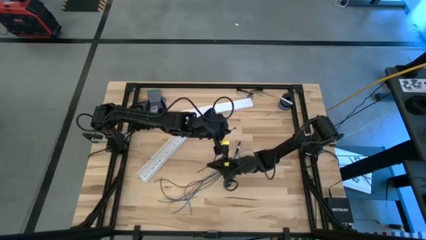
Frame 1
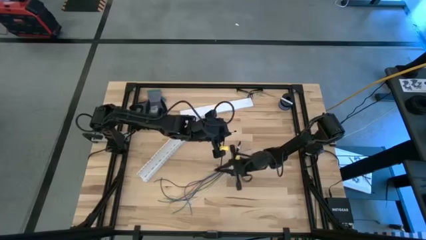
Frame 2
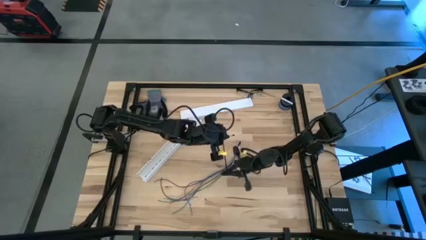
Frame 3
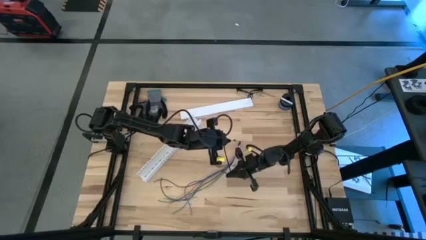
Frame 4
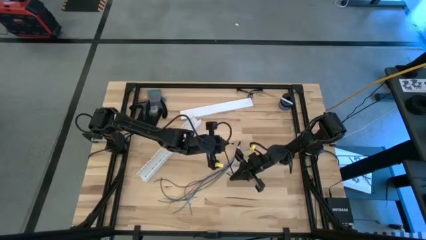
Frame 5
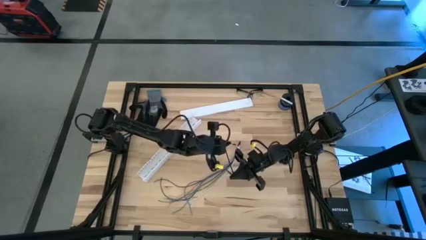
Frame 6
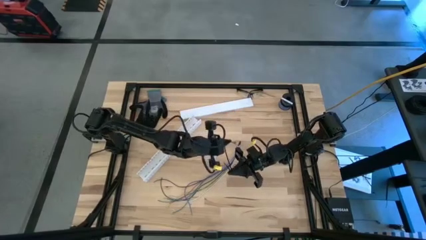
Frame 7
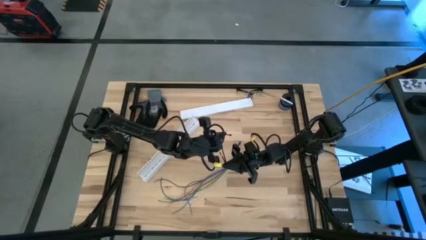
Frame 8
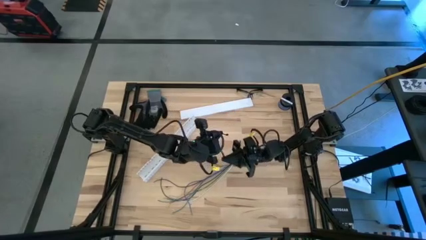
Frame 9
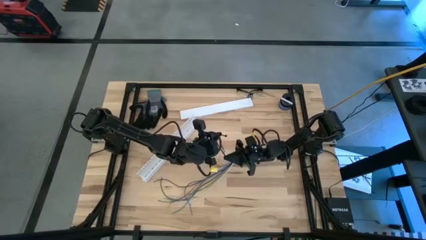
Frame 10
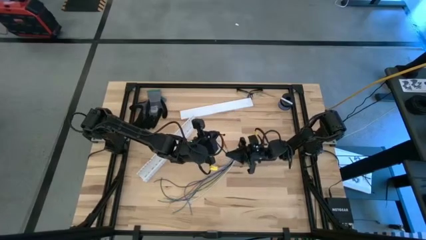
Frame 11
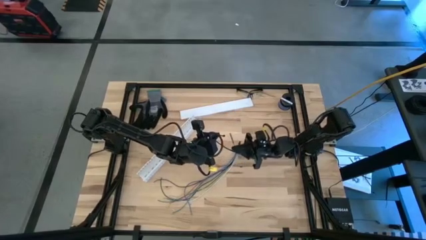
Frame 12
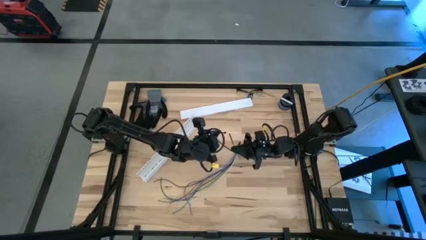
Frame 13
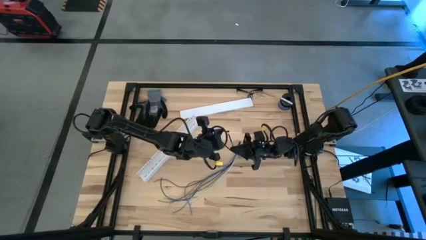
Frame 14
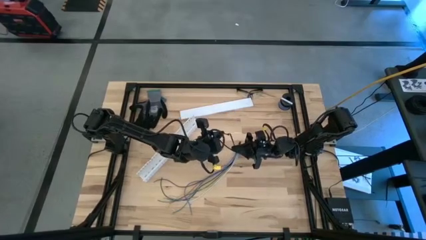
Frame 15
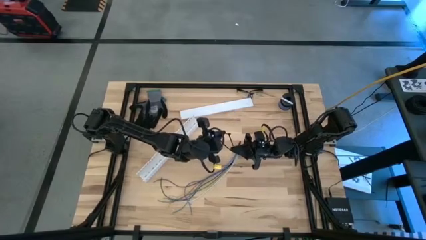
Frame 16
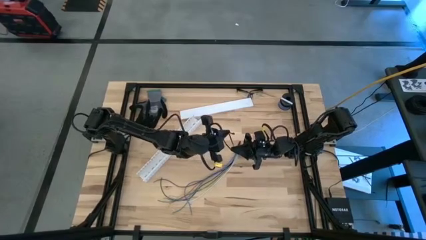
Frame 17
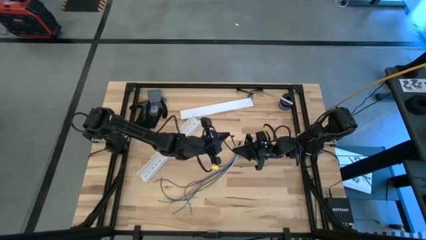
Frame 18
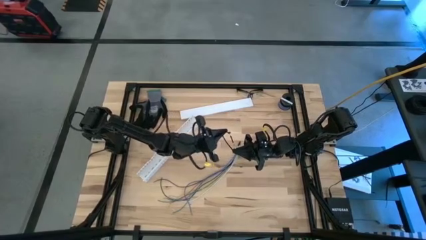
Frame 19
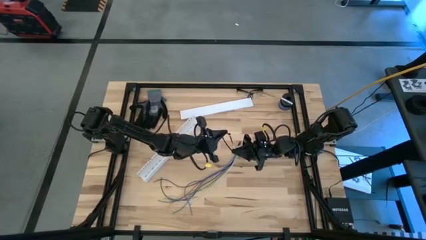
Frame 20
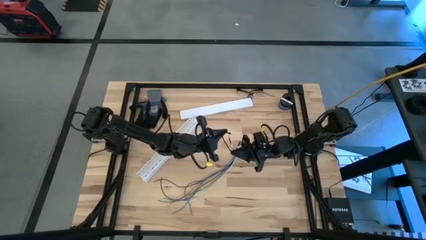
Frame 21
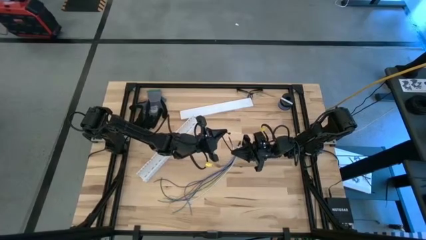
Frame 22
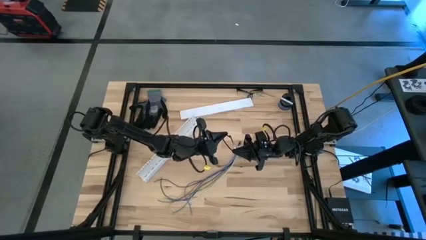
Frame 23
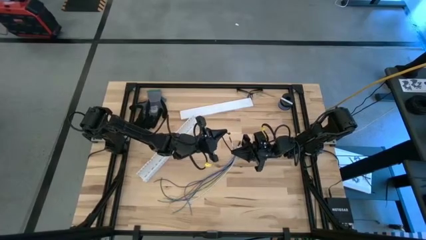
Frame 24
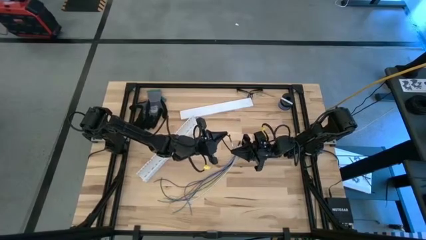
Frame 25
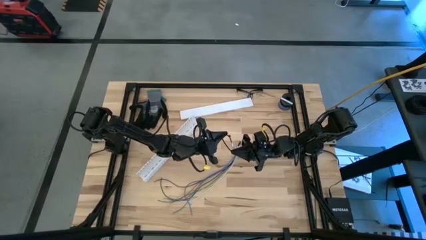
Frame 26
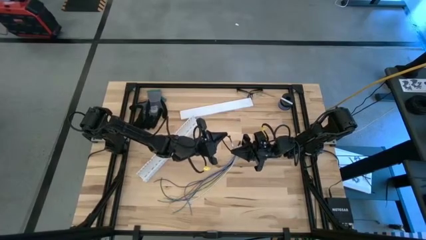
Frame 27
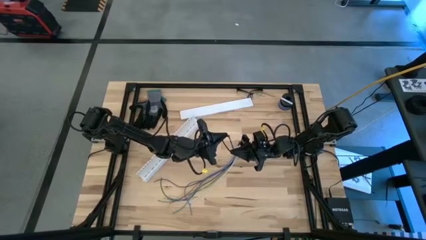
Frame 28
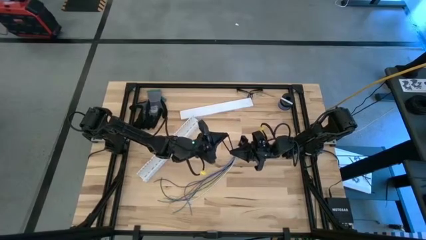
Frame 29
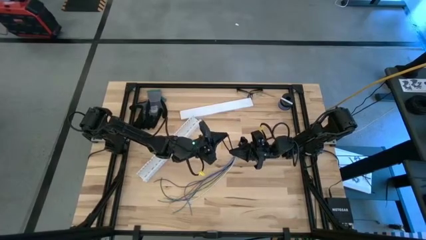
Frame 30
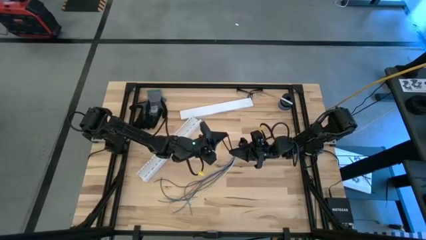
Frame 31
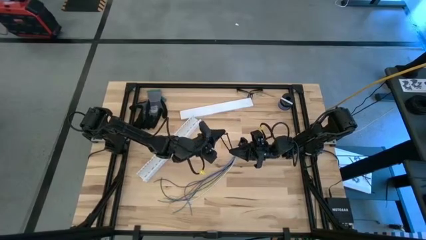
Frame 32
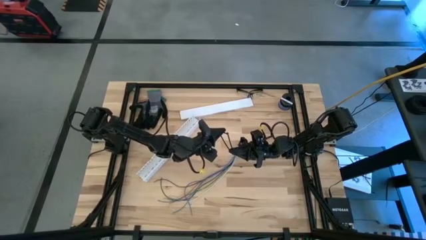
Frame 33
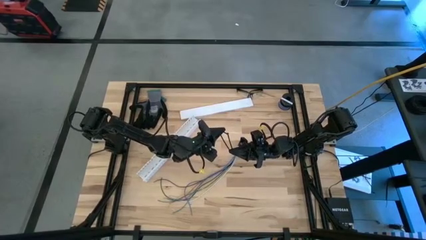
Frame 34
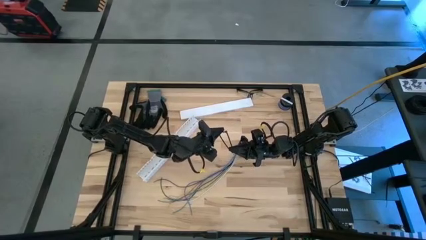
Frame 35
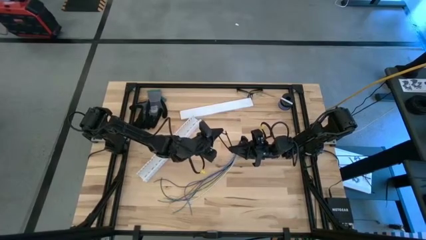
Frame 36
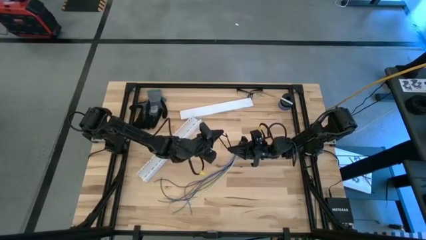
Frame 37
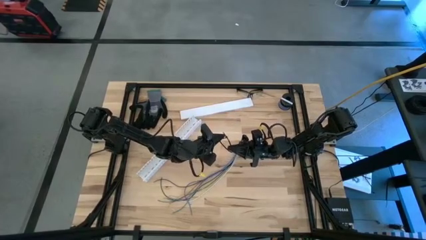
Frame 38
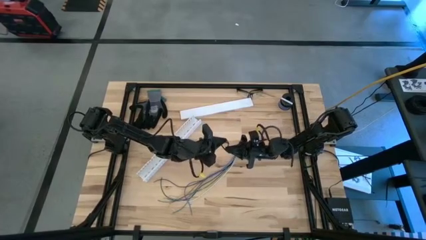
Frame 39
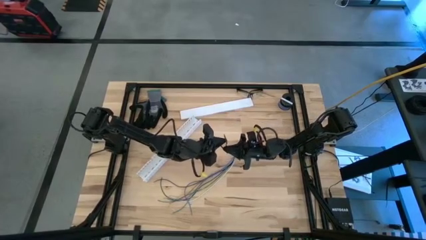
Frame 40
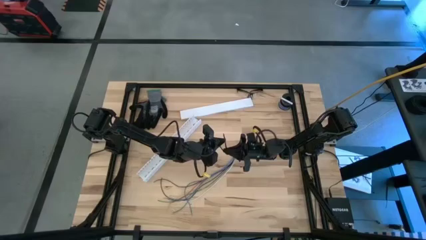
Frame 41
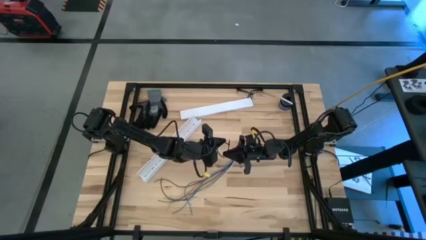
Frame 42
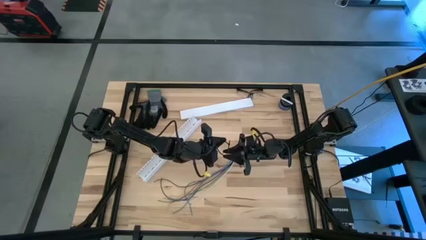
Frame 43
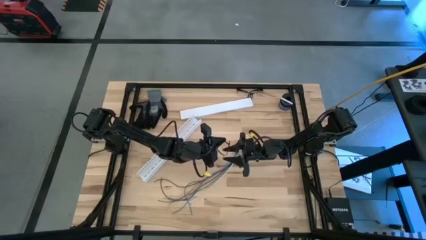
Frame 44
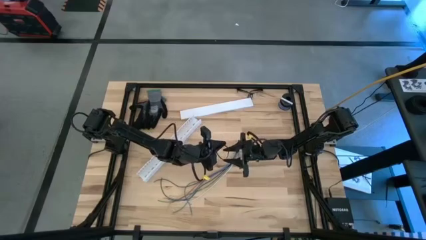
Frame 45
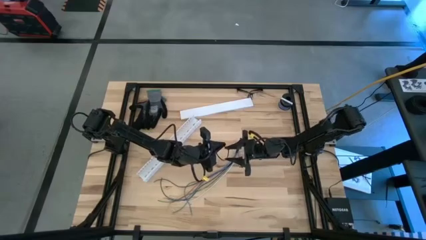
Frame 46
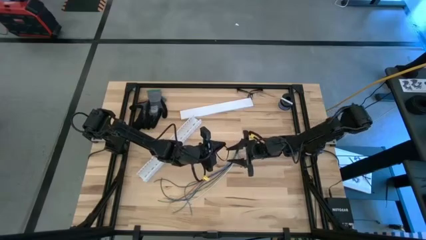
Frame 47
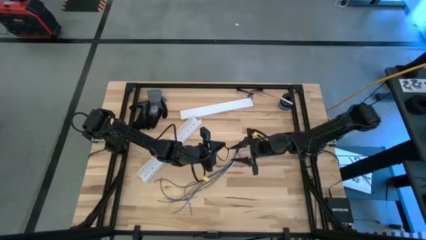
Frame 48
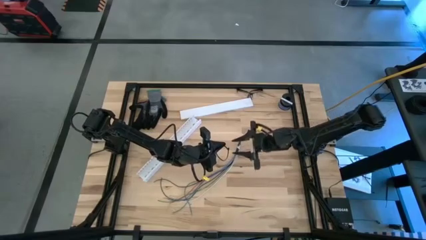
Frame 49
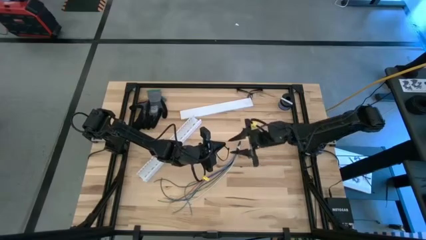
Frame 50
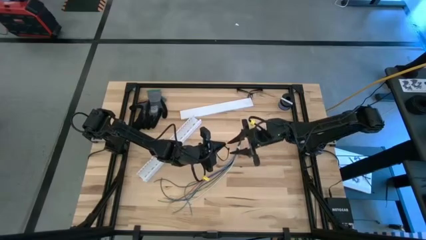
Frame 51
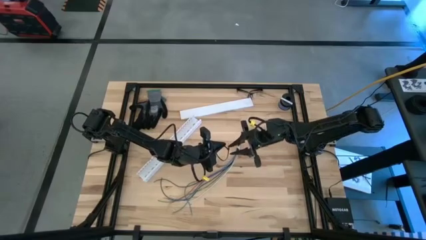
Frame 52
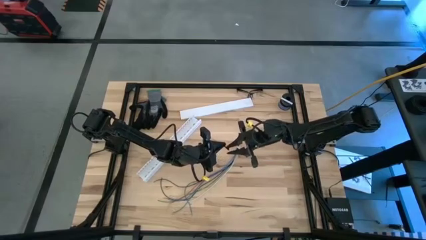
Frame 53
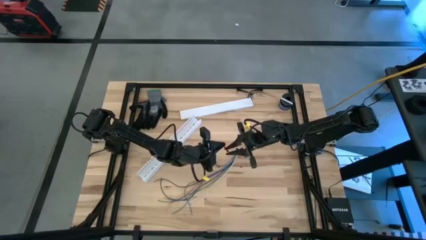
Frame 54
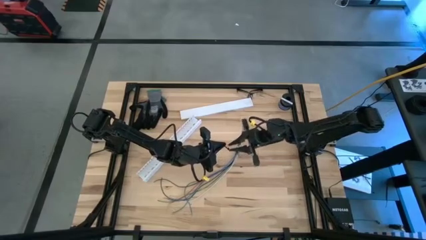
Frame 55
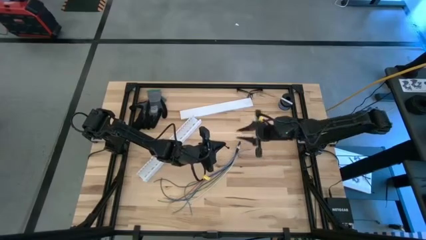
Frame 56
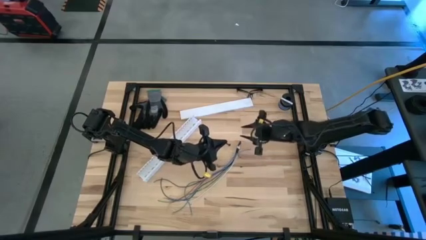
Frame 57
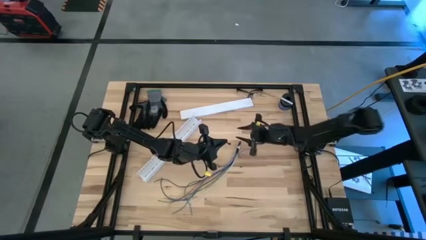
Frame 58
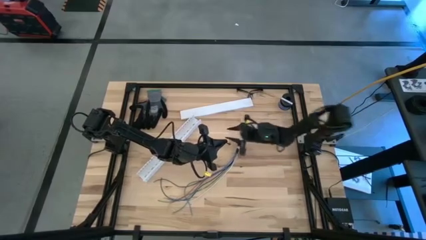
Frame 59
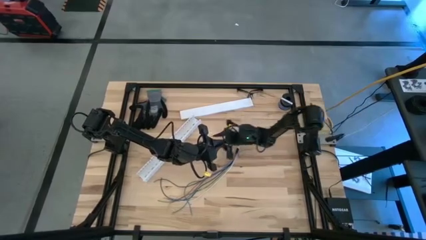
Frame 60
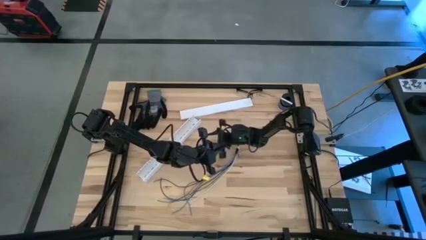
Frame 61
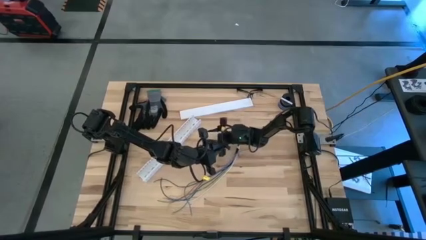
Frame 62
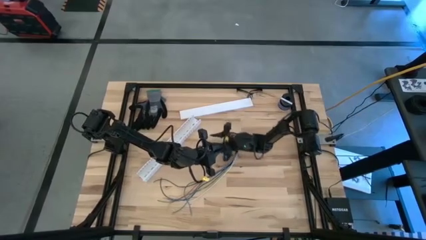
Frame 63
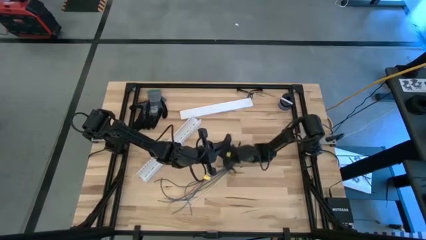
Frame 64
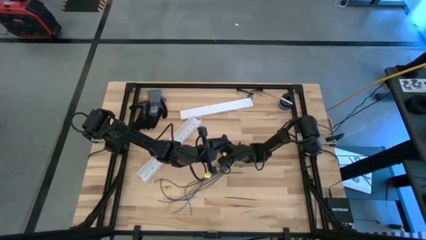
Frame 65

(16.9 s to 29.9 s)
Task: Ziptie cables
Wrap the zip tie on the cables

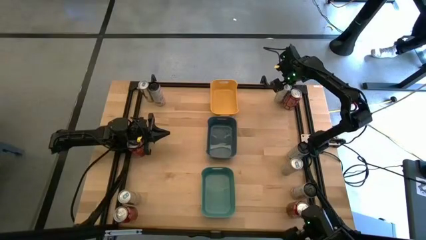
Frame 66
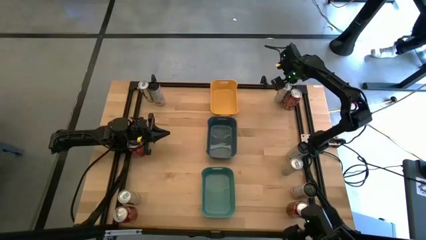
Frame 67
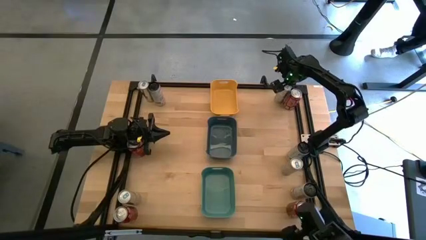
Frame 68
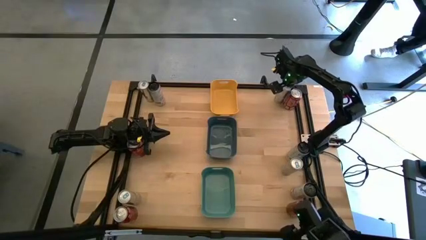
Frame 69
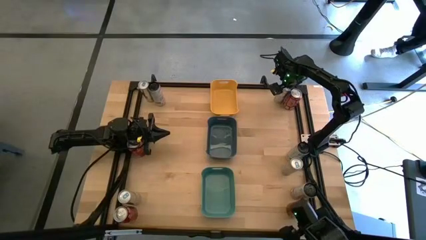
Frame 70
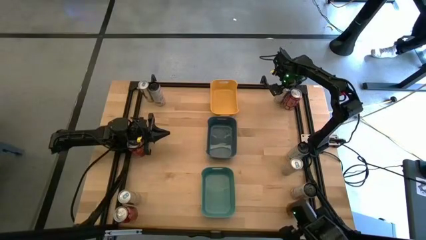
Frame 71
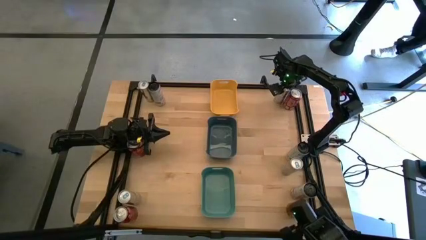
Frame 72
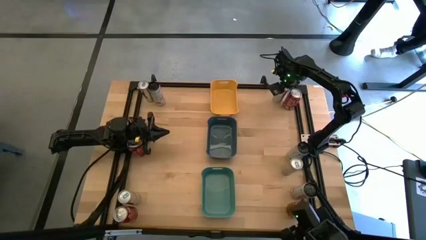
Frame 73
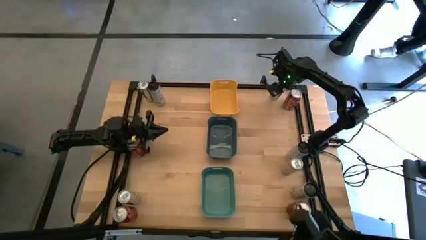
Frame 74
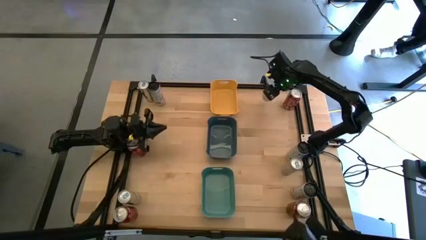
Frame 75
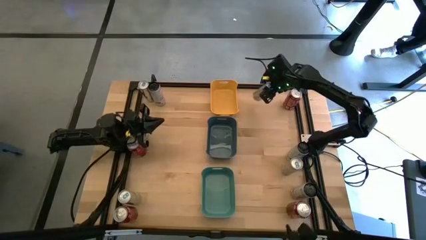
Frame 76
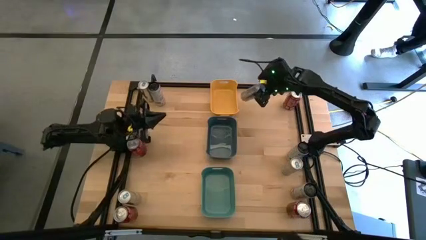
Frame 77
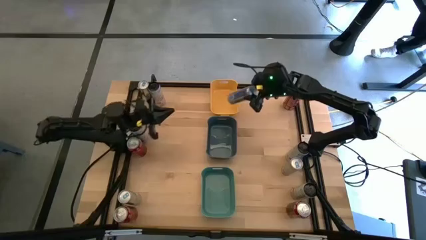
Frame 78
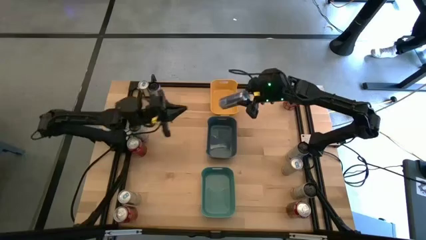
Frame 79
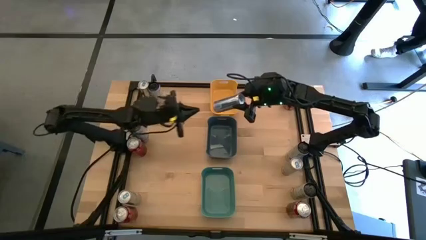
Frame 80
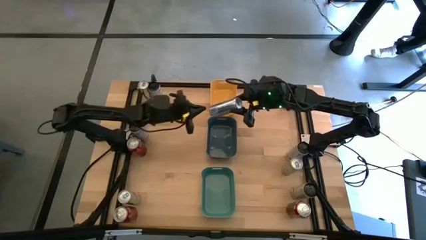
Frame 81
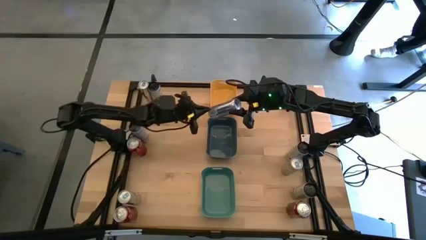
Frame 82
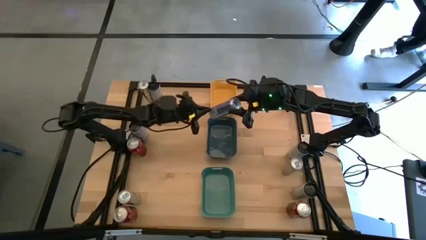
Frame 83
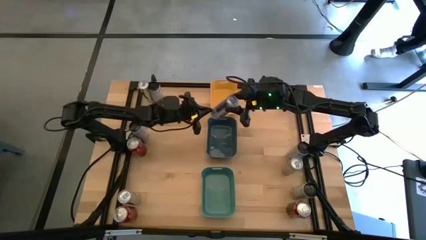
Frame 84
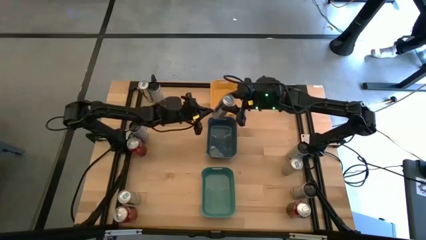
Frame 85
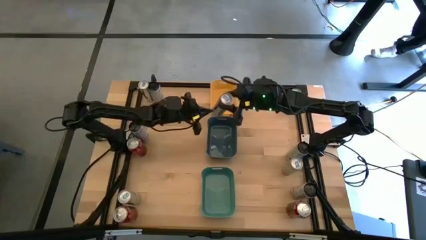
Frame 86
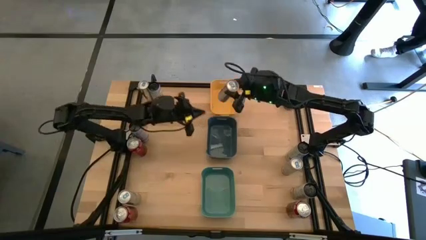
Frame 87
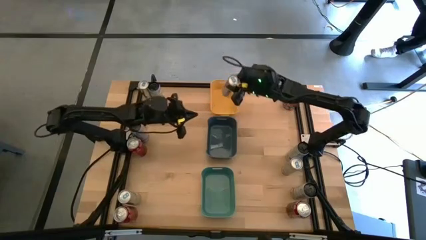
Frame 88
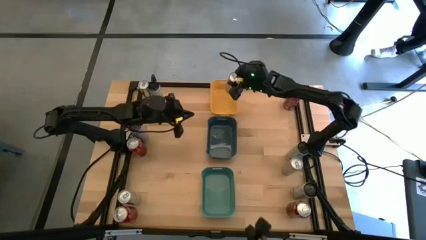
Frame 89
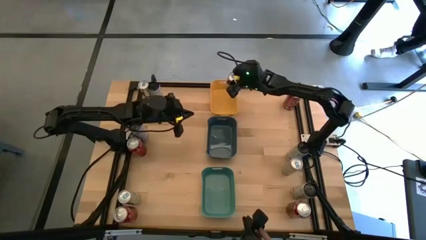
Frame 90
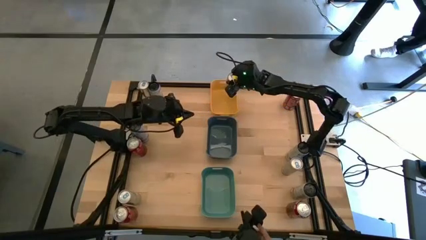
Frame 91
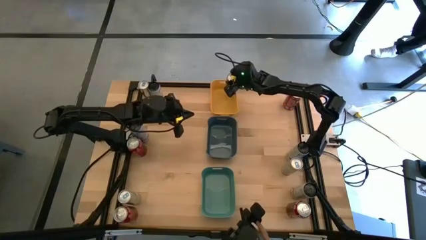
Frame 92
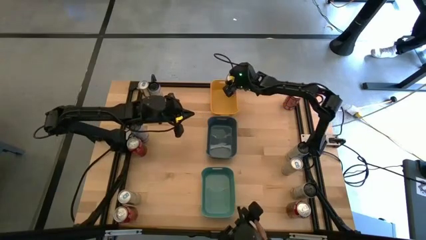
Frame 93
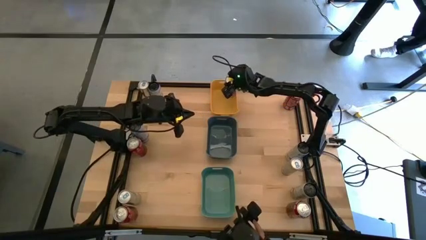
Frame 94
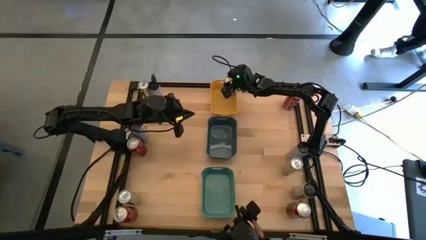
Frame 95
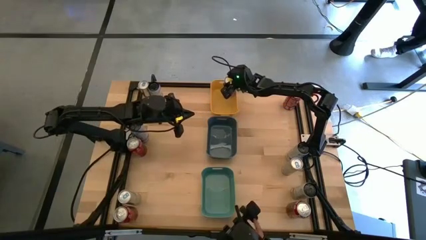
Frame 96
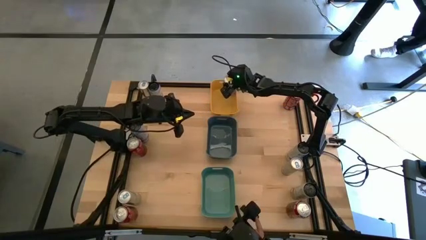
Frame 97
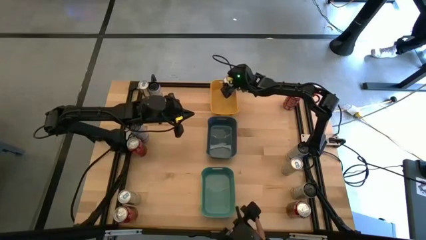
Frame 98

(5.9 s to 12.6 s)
Task: Sort soda cans
Put the top right blue soda can into the yellow bin
